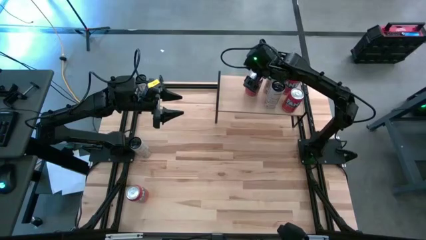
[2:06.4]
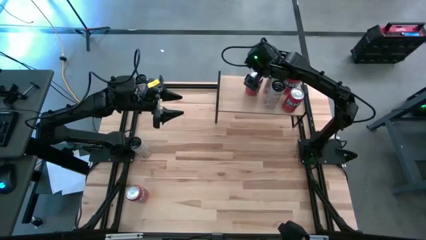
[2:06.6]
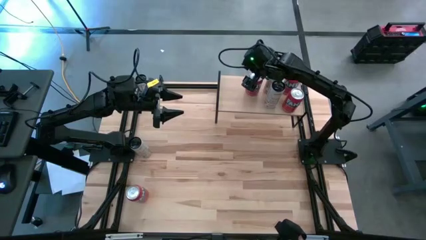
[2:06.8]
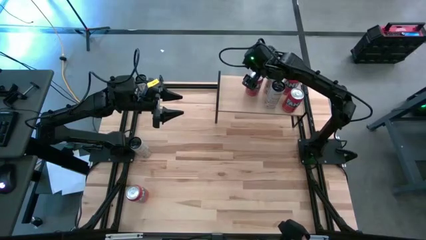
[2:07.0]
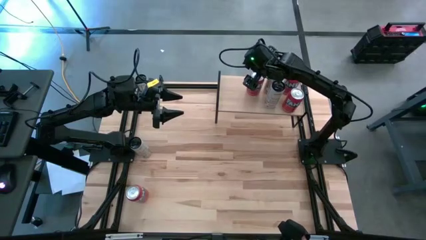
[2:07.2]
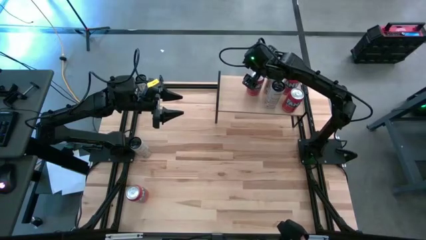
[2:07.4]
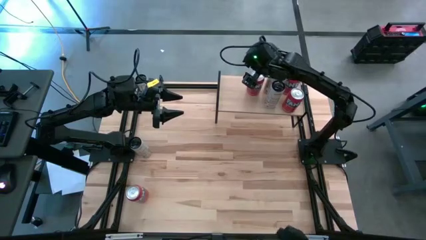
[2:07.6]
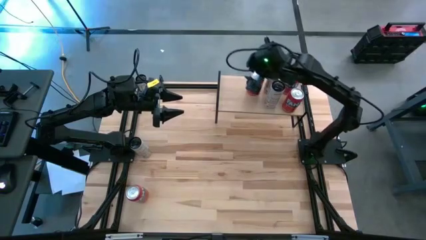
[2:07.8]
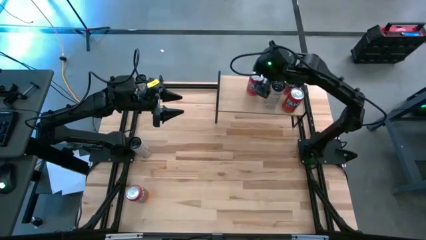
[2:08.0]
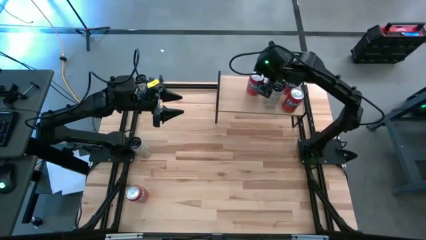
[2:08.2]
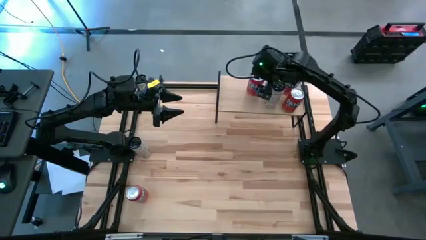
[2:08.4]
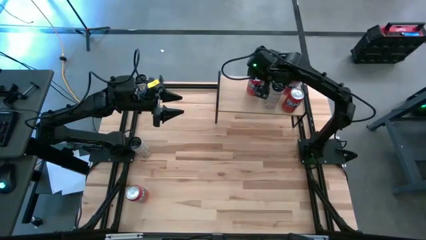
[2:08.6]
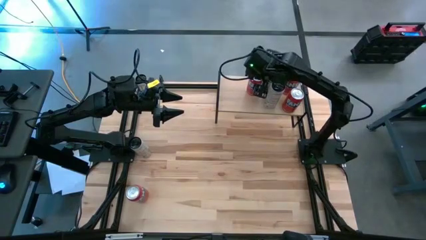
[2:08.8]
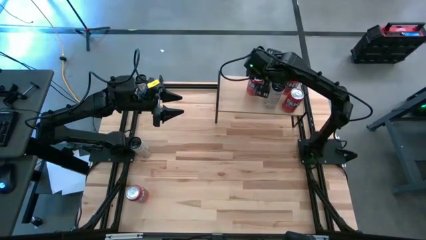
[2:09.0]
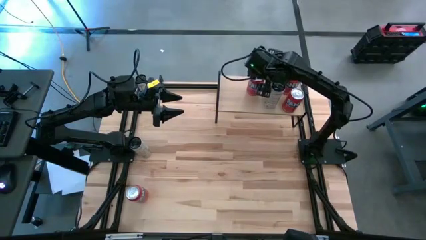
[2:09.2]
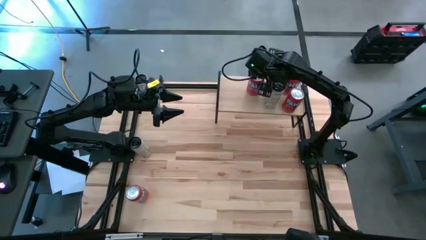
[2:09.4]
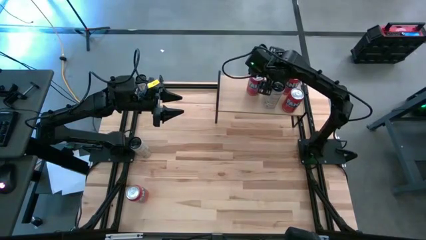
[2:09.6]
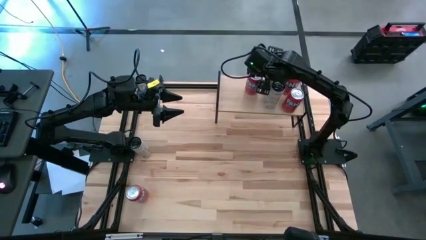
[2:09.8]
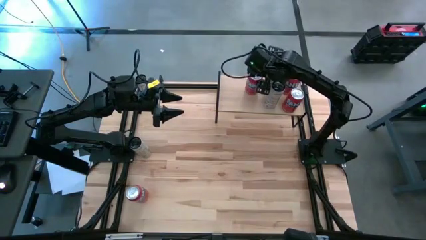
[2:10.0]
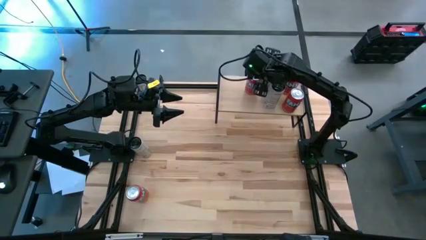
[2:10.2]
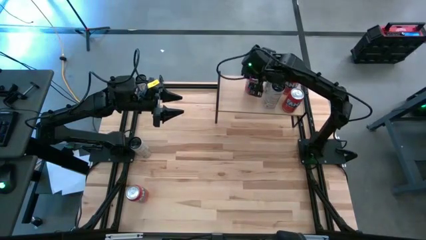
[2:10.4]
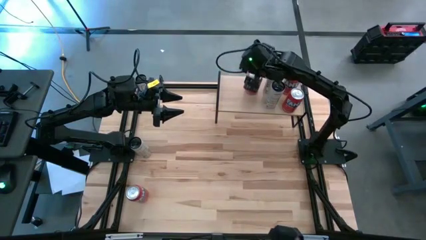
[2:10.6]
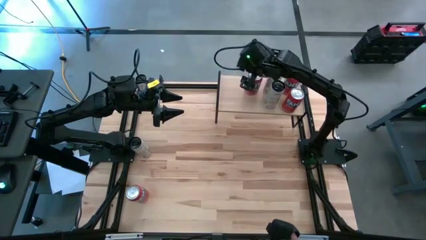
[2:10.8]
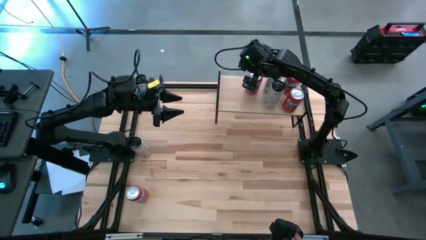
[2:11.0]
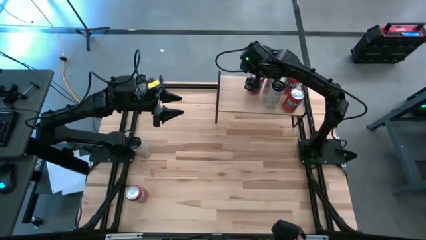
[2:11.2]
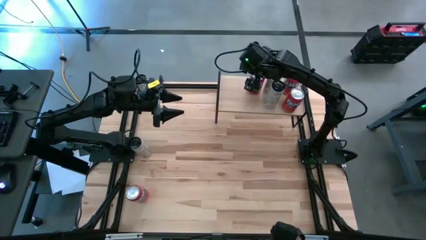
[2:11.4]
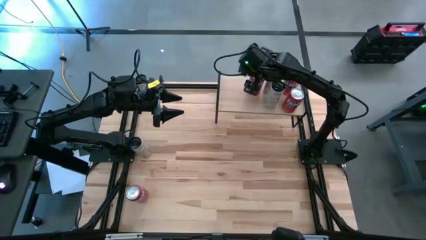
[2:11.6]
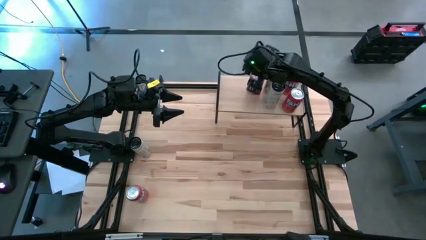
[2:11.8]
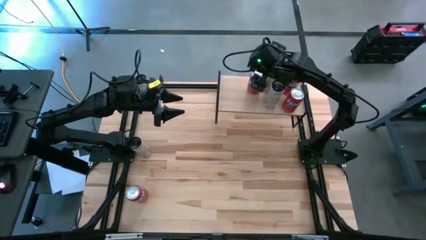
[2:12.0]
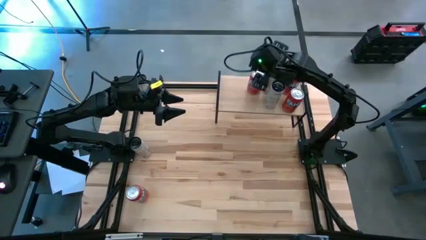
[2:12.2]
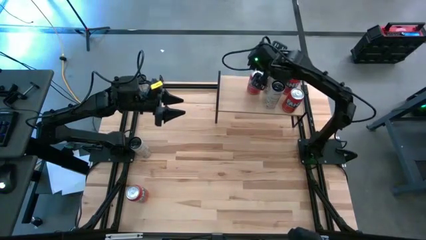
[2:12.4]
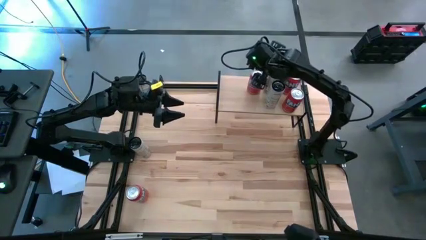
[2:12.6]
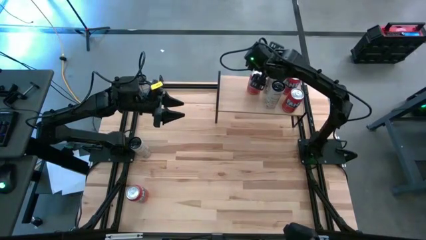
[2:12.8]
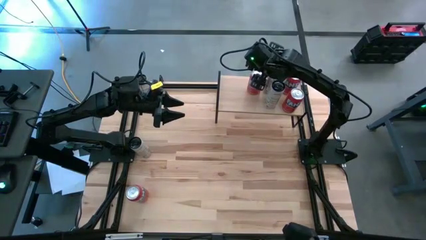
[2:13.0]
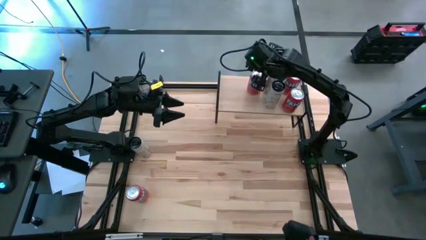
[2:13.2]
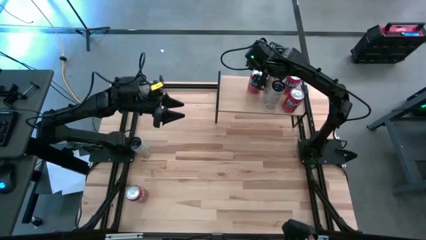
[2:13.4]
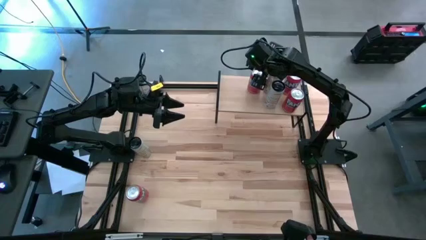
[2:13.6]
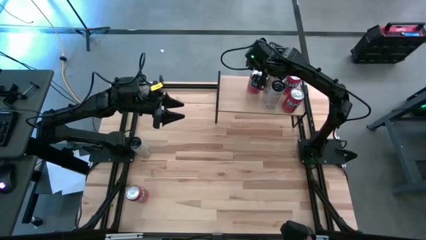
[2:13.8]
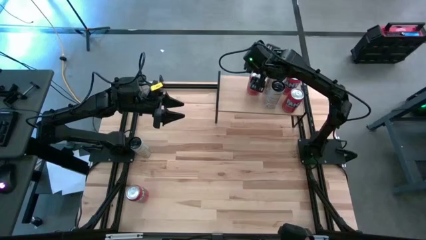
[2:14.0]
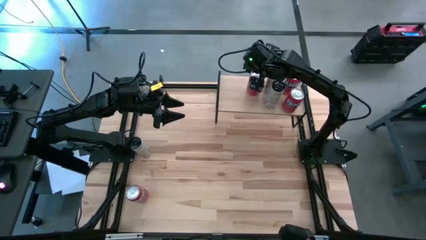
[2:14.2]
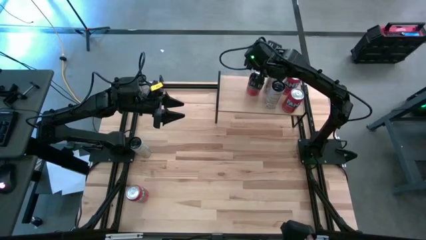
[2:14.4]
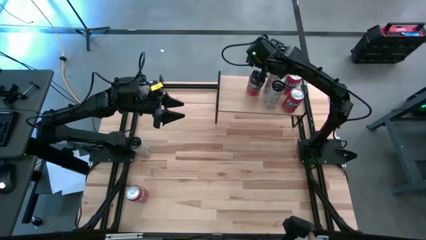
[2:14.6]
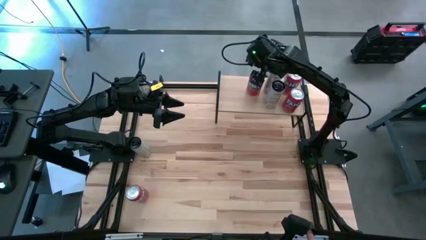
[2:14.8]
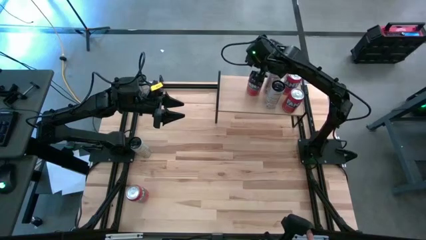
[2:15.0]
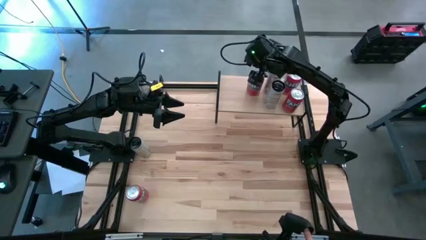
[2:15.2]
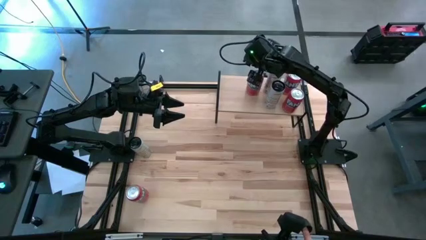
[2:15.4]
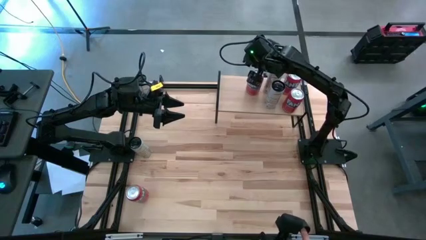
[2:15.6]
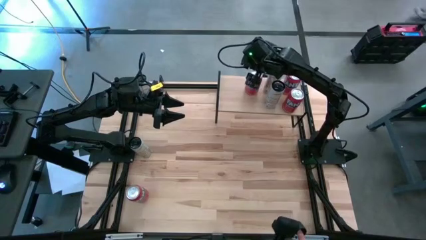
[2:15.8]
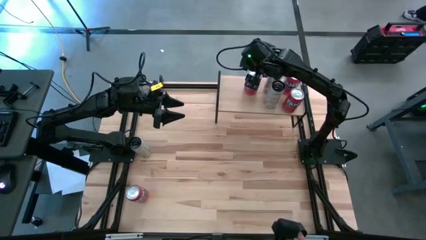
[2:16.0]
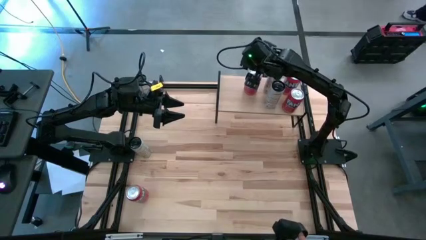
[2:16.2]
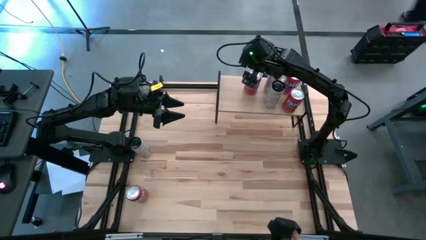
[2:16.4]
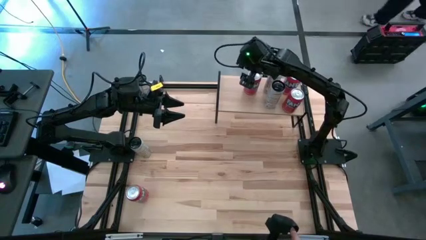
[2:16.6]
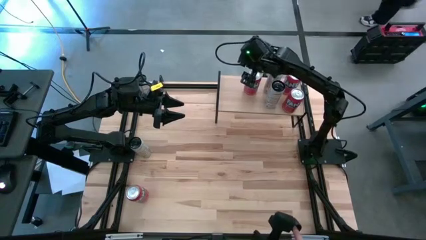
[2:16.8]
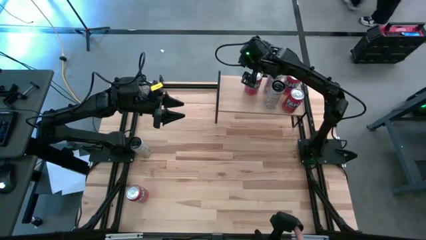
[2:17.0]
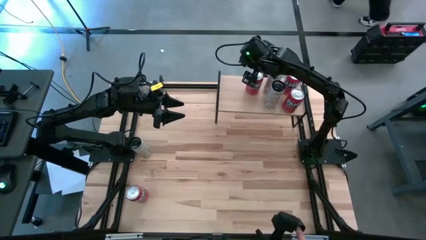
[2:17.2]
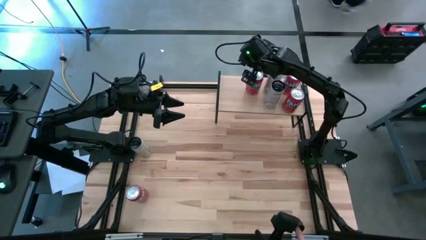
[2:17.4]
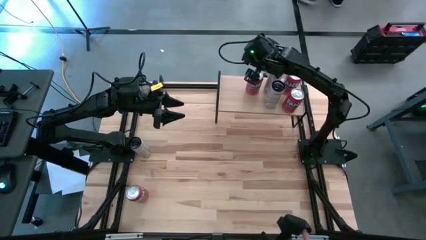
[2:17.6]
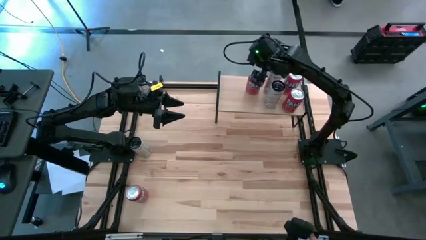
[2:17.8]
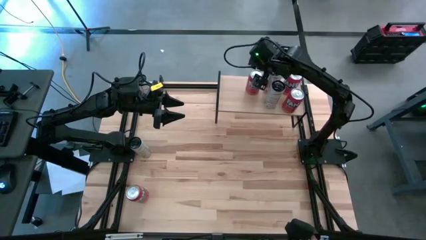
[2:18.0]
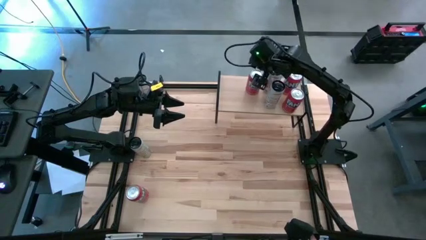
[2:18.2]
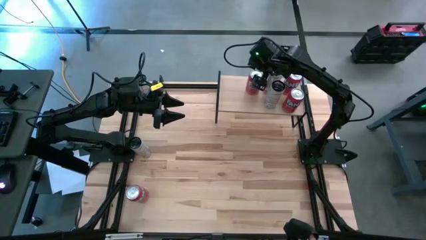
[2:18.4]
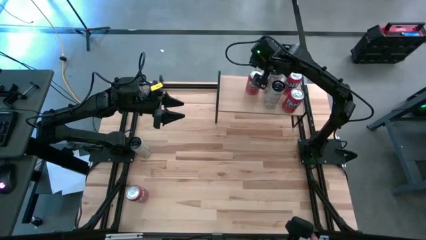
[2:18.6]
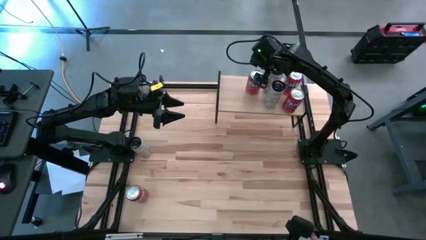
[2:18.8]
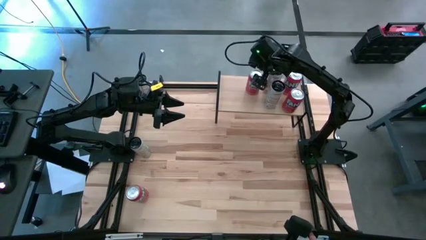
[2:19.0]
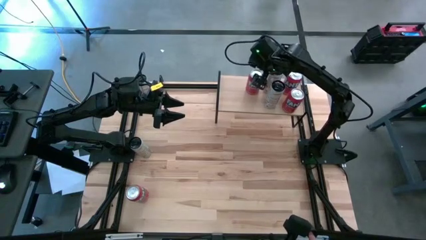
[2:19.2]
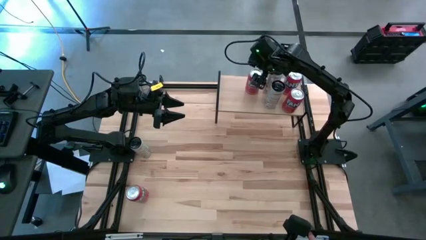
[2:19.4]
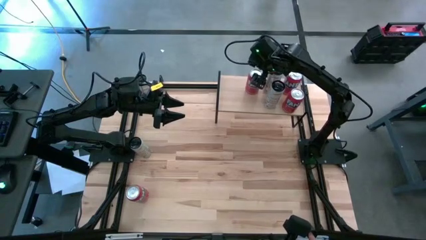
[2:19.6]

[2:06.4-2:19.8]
Task: Place canned beverage on shelf
Put the orange soda can on the shelf

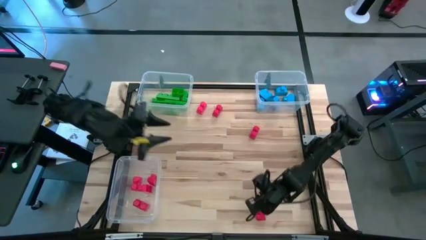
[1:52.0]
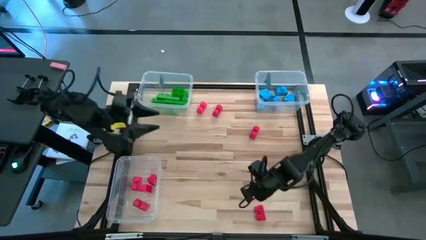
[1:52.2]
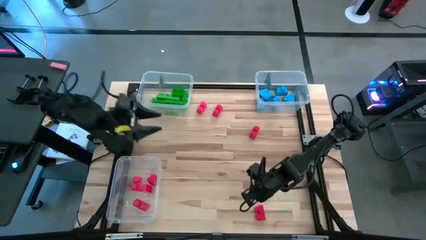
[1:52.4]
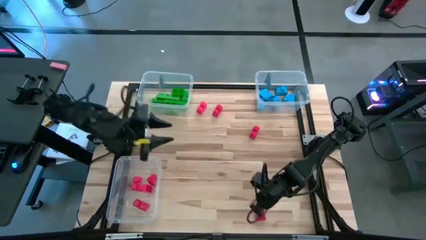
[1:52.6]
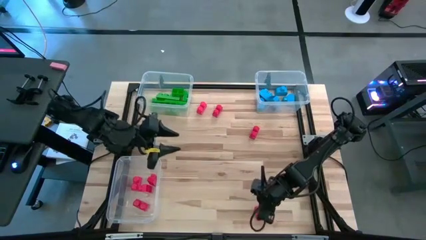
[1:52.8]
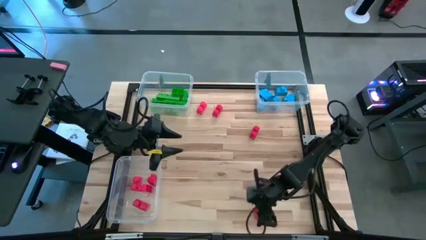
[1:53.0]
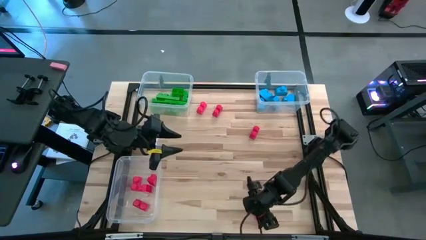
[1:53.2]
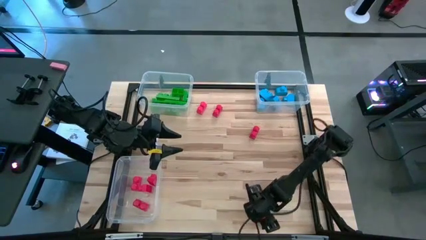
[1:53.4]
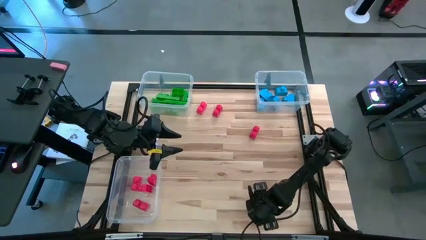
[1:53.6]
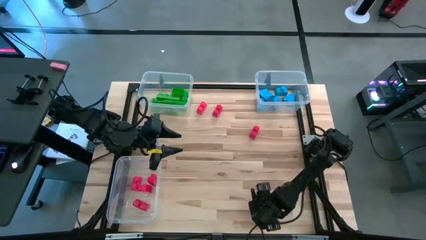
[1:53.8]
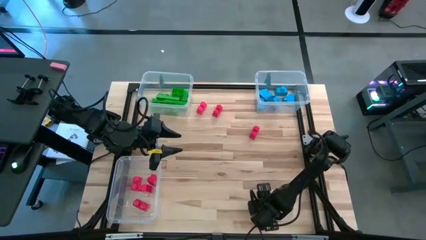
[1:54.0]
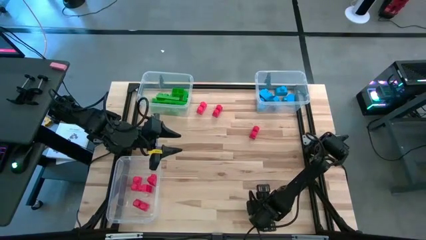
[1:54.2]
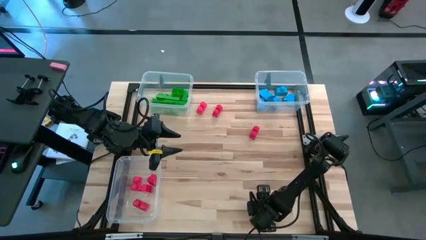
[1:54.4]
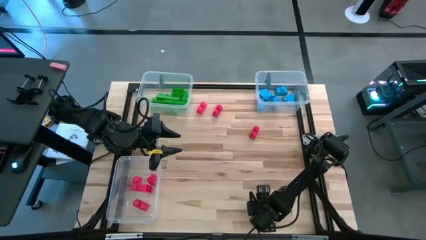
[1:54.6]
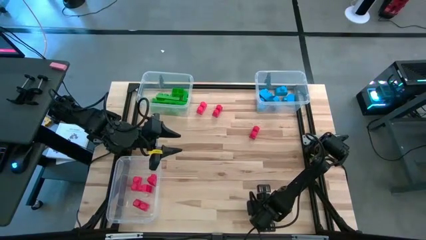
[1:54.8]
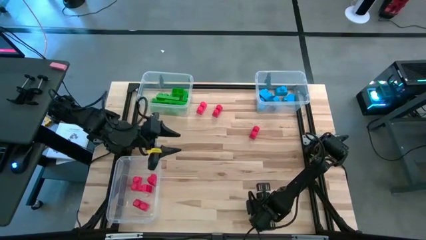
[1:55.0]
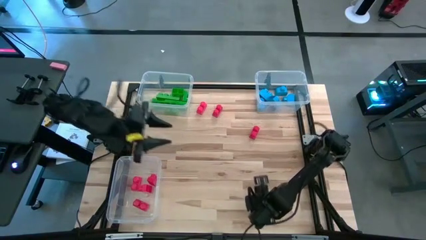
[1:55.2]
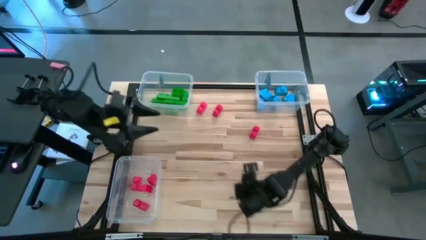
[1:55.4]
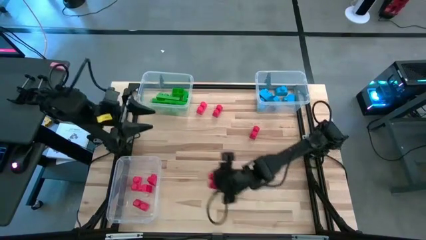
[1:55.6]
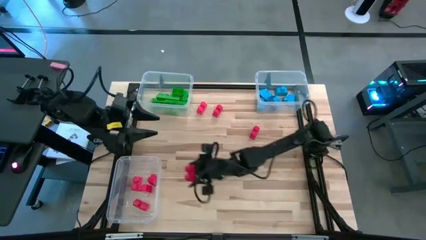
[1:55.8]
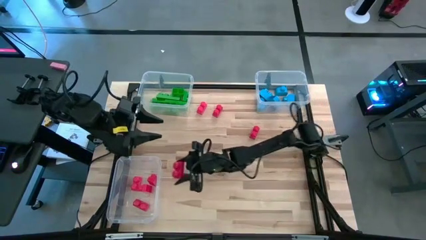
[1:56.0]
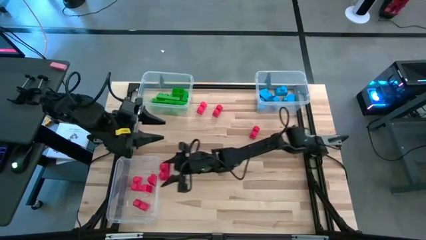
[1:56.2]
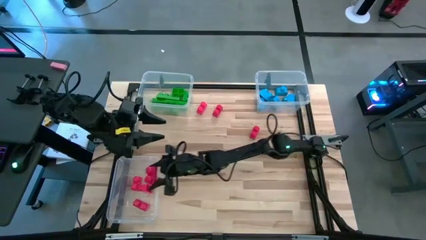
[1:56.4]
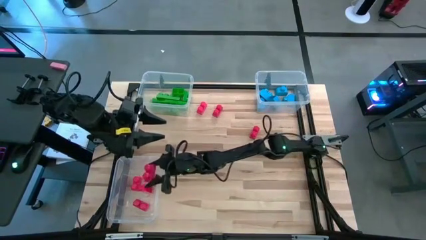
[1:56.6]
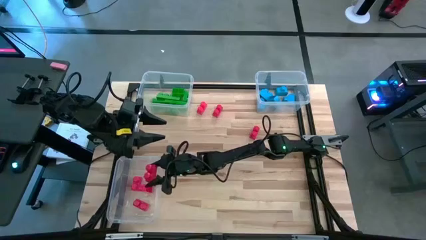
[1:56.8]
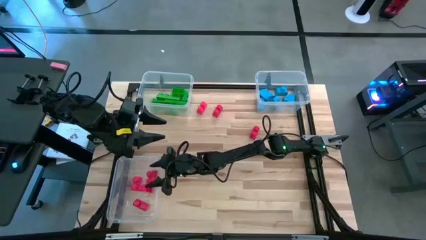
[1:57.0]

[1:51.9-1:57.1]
Task: Sort blocks
Put the red game piece into the bottom left transparent bin
